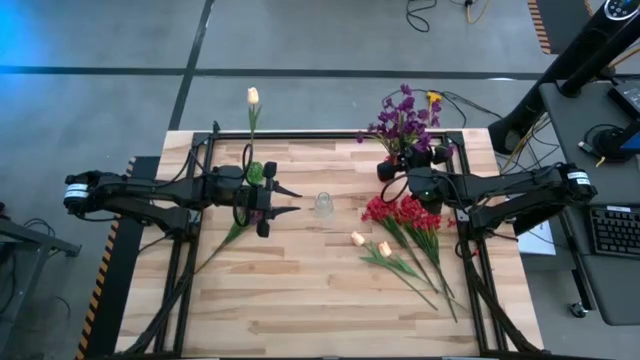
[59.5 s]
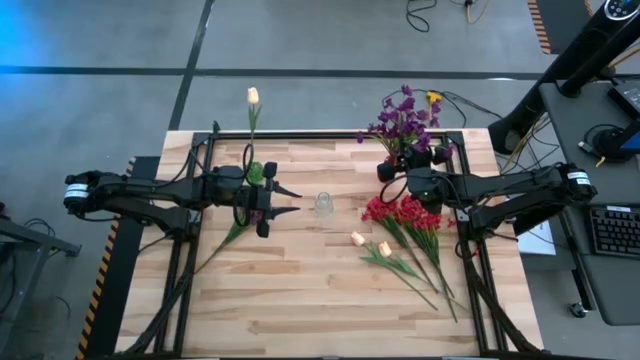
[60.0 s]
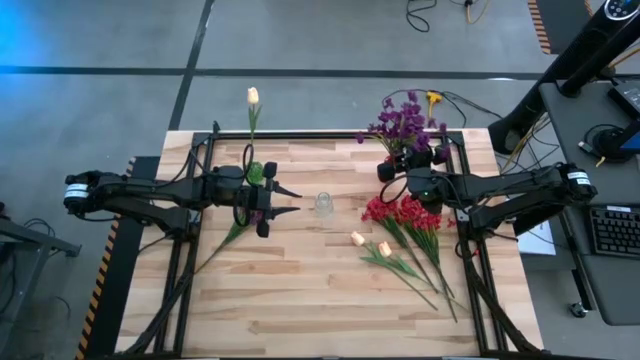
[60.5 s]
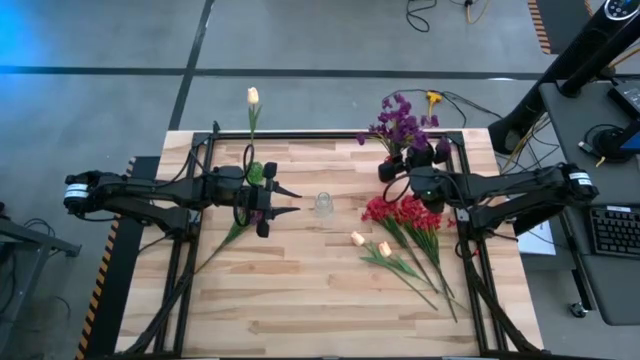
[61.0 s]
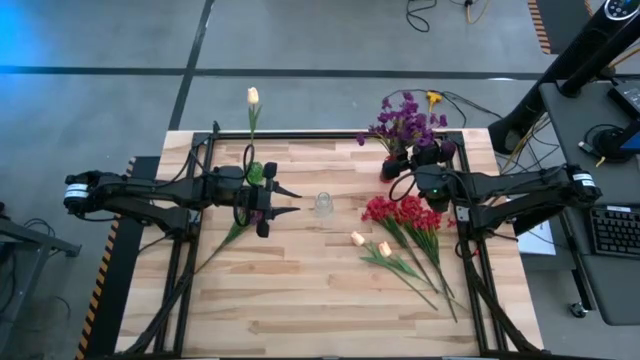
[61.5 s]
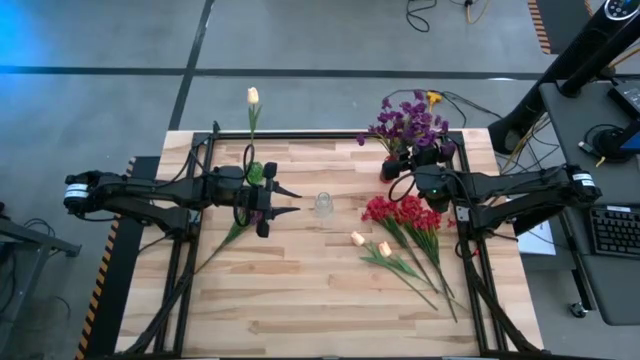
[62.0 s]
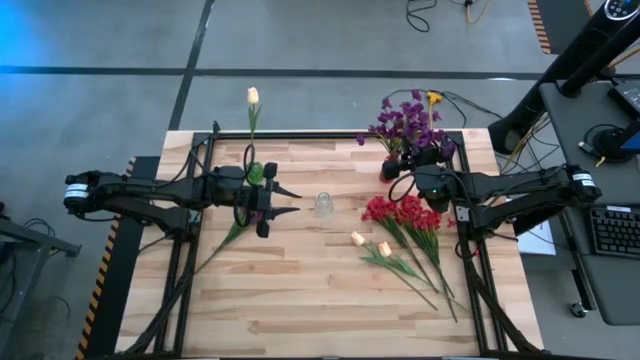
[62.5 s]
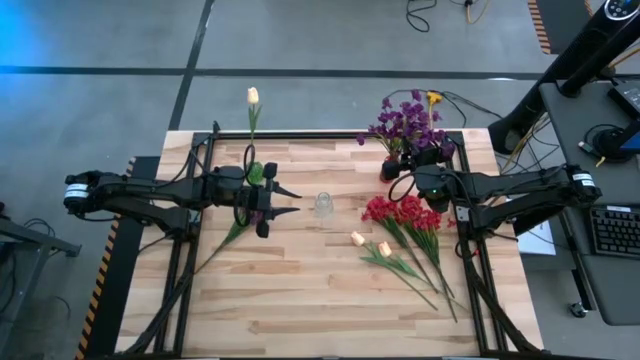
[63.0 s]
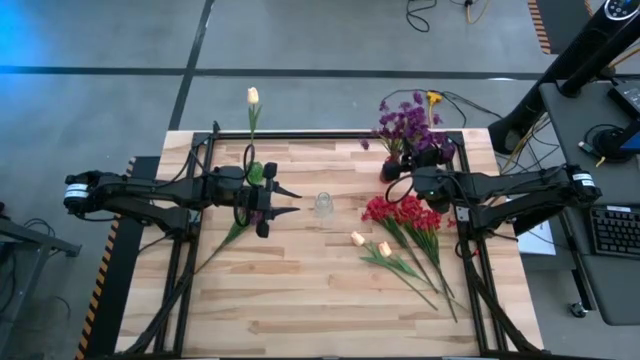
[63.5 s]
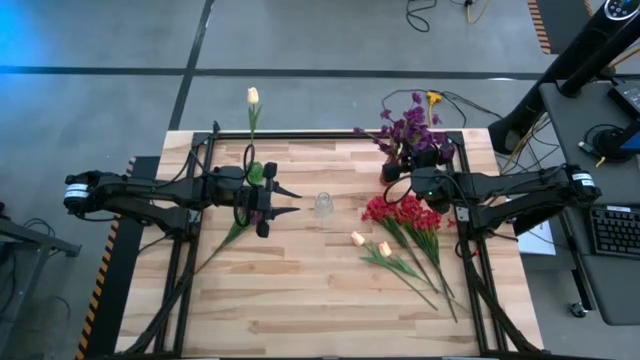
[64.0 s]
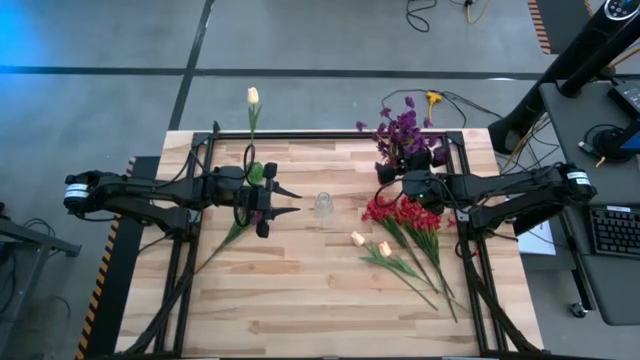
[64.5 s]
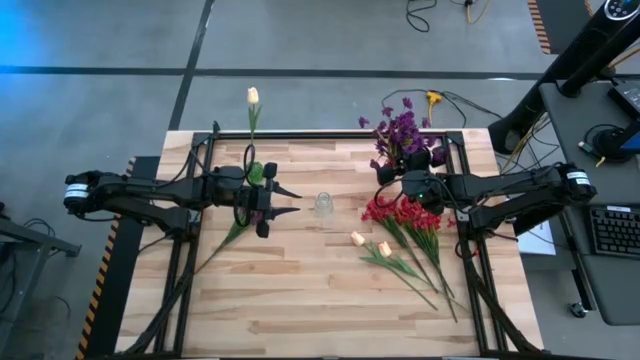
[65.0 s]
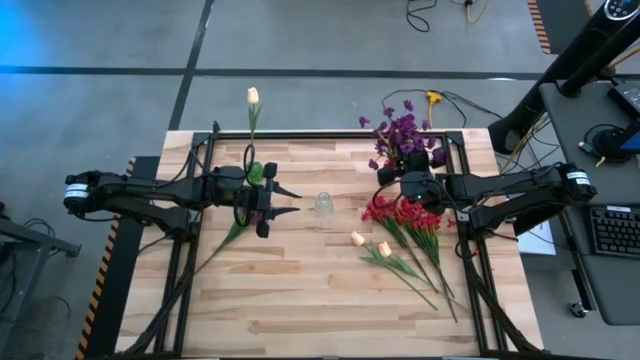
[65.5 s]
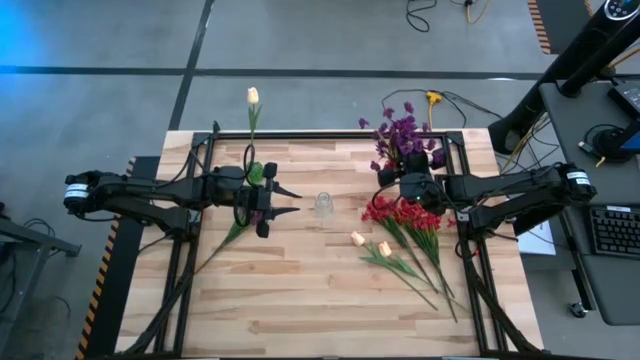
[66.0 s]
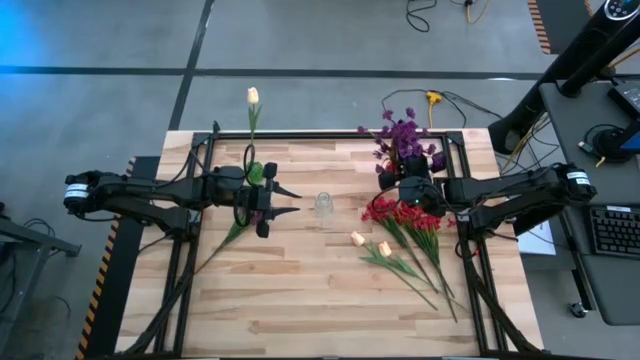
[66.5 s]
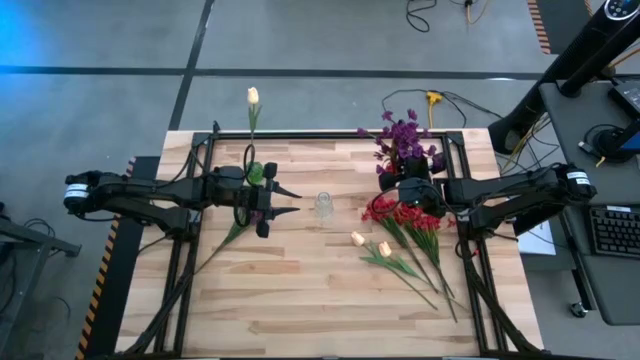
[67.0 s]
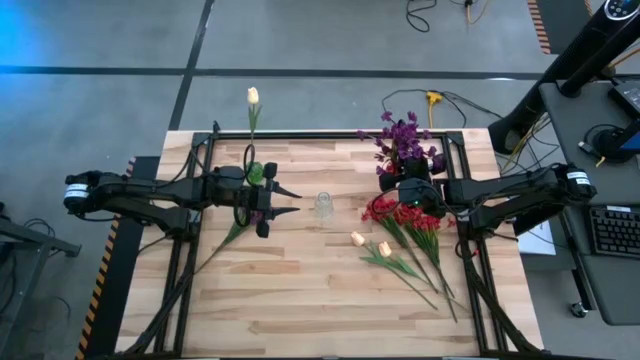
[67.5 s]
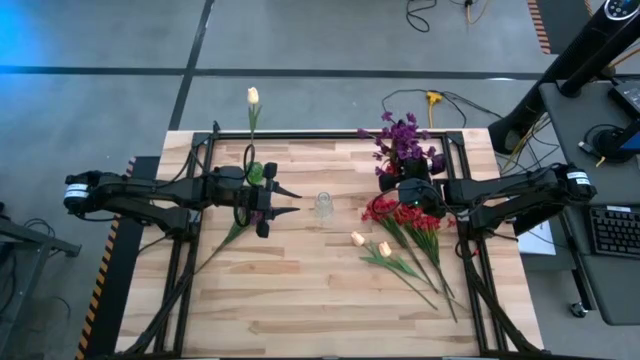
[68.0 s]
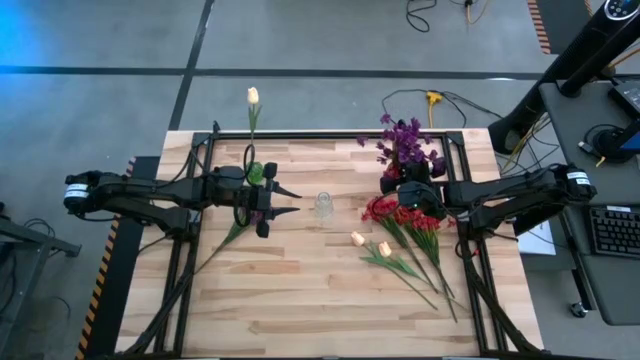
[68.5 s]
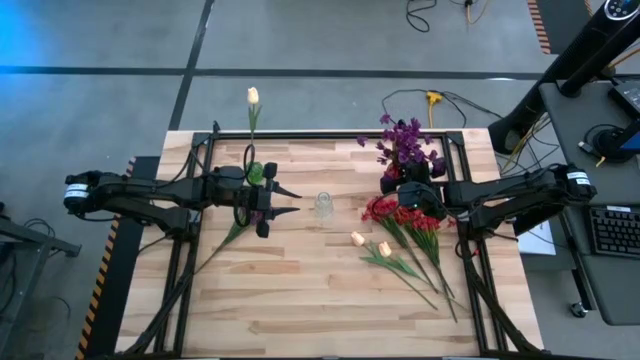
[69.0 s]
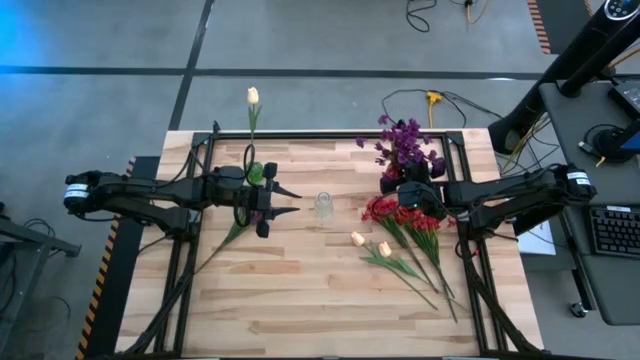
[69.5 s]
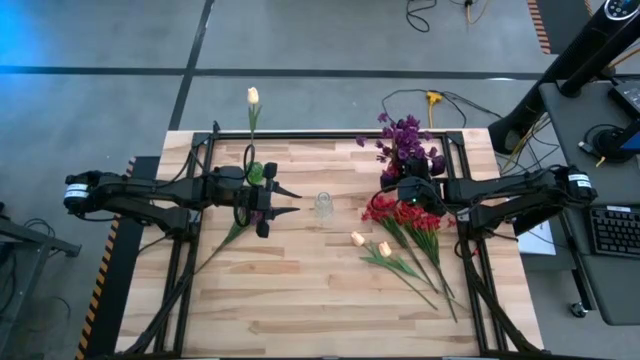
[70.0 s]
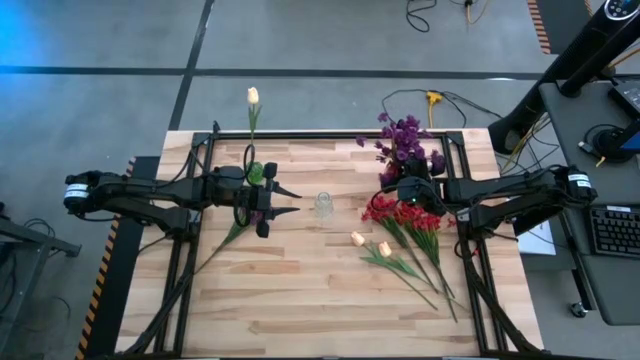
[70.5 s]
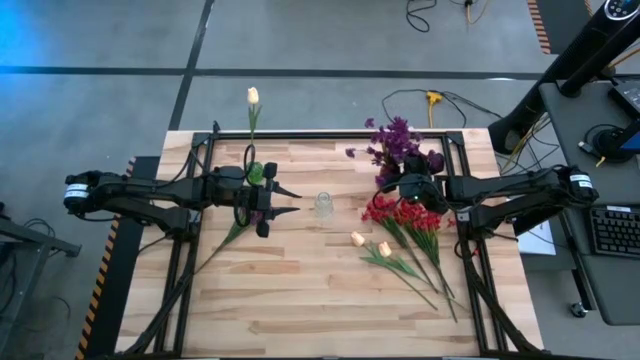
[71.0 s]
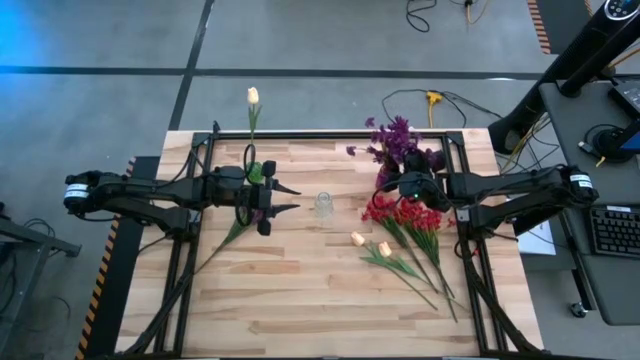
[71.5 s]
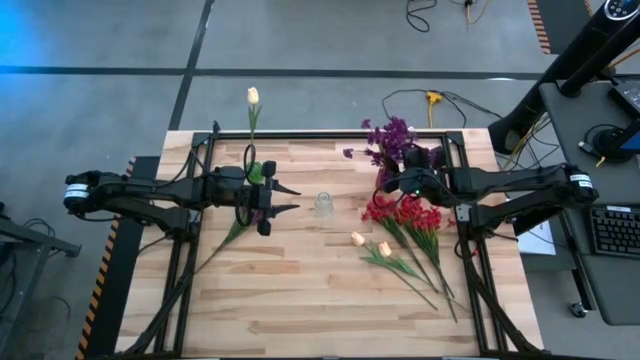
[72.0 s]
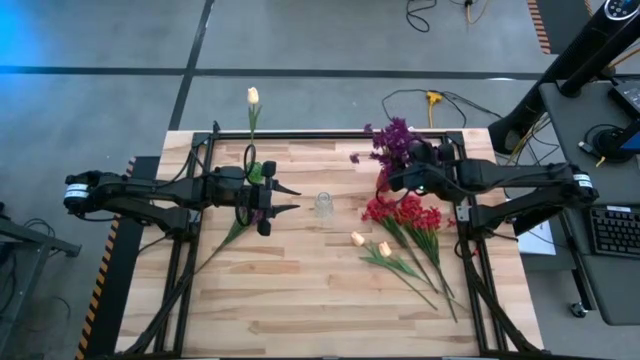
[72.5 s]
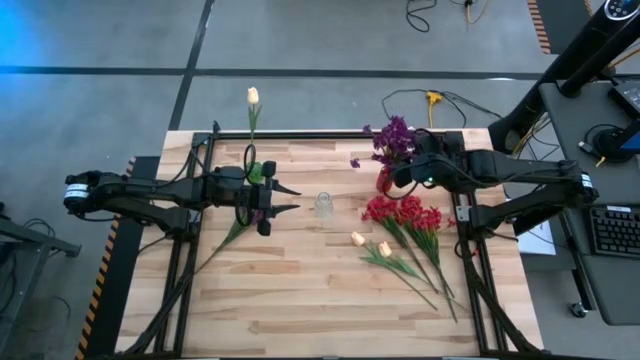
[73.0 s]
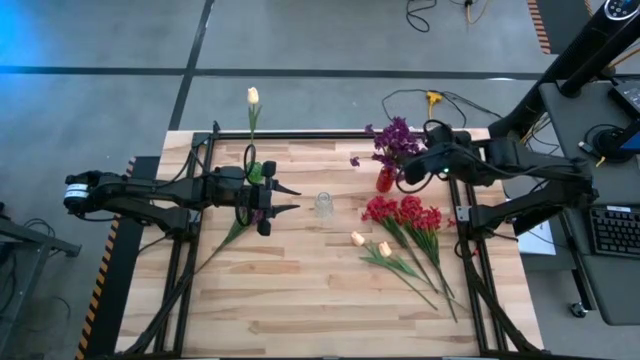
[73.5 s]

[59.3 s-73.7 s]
Task: Sort flowers into vase by color
Put the bottom violet flowers into the red vase
